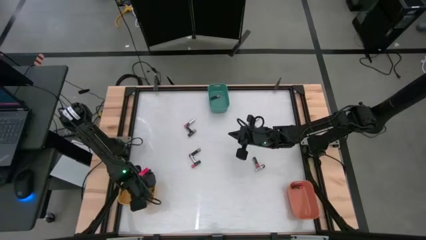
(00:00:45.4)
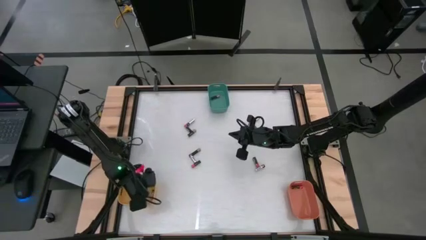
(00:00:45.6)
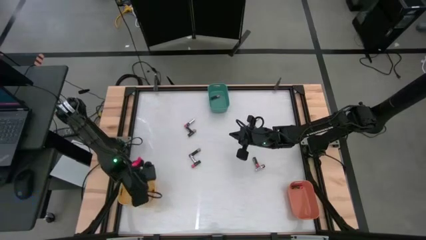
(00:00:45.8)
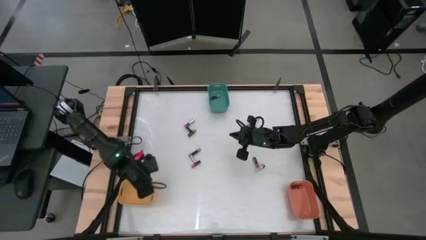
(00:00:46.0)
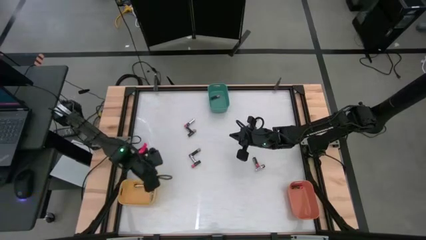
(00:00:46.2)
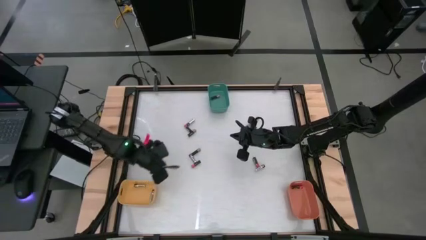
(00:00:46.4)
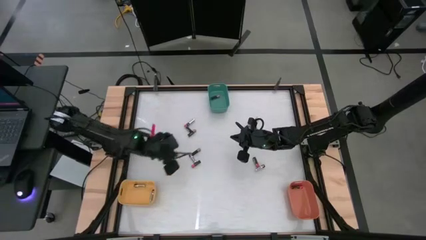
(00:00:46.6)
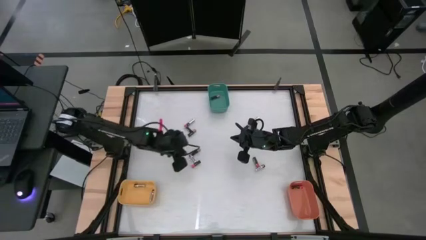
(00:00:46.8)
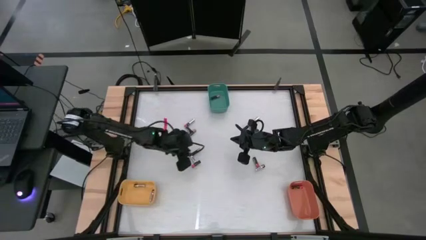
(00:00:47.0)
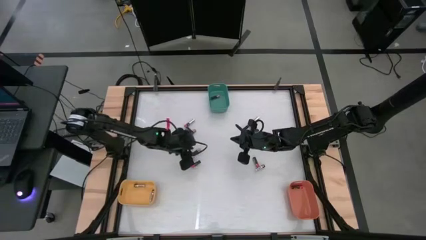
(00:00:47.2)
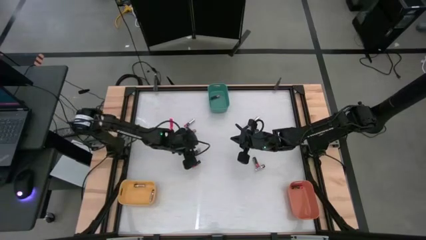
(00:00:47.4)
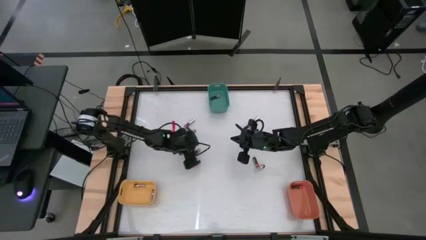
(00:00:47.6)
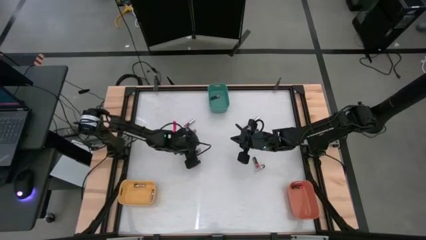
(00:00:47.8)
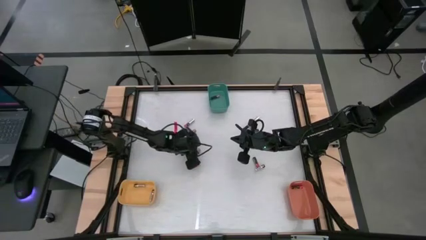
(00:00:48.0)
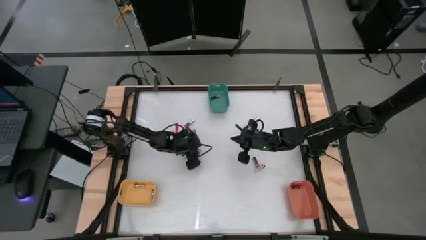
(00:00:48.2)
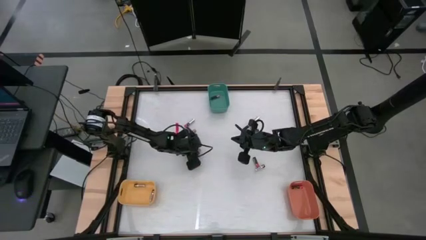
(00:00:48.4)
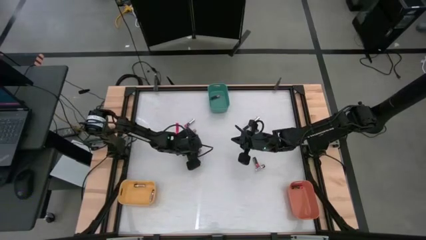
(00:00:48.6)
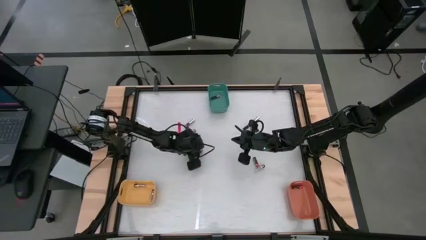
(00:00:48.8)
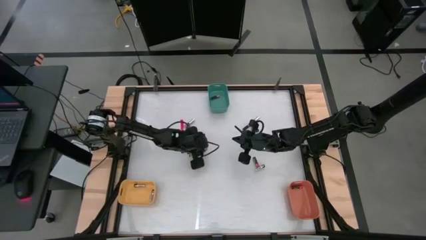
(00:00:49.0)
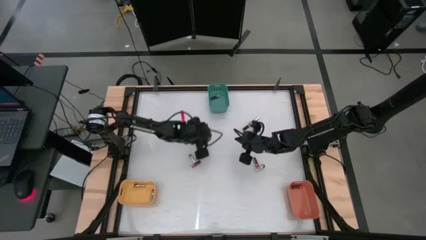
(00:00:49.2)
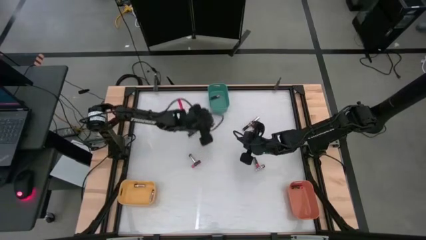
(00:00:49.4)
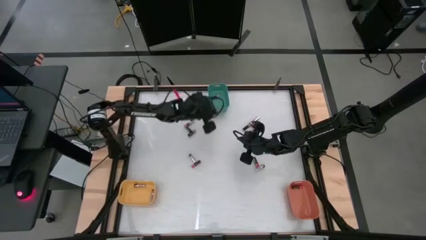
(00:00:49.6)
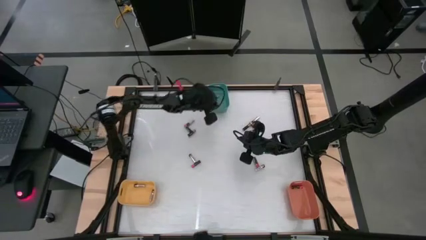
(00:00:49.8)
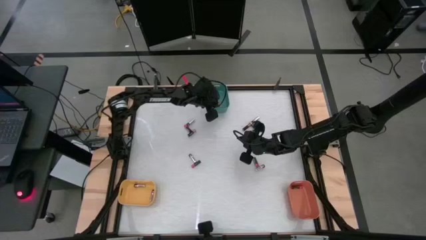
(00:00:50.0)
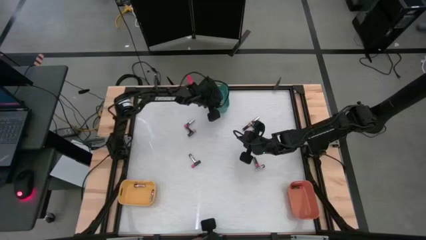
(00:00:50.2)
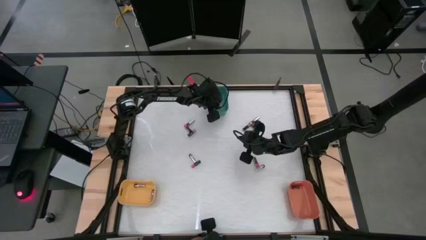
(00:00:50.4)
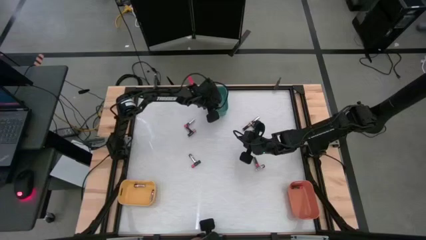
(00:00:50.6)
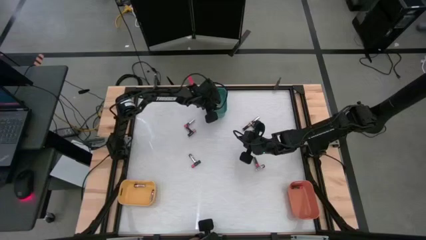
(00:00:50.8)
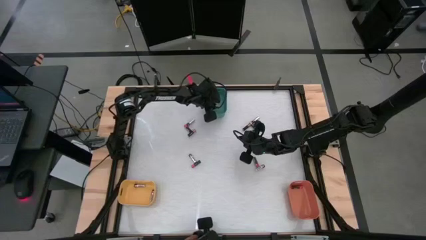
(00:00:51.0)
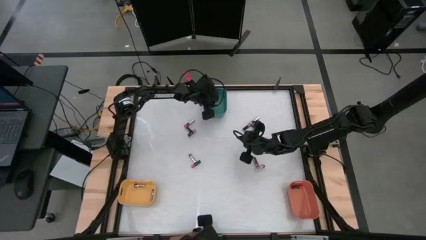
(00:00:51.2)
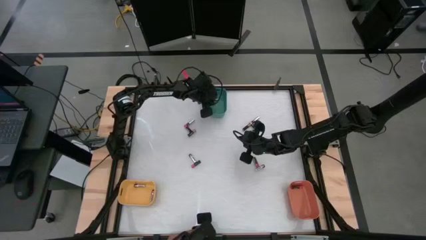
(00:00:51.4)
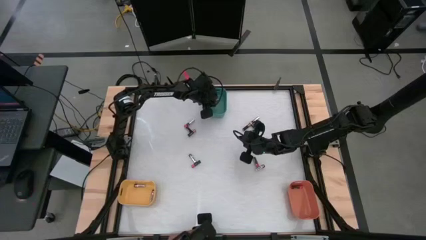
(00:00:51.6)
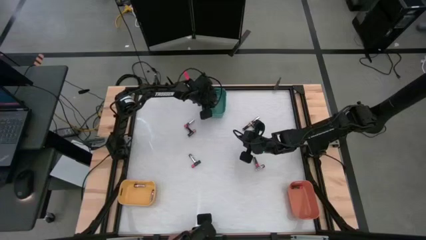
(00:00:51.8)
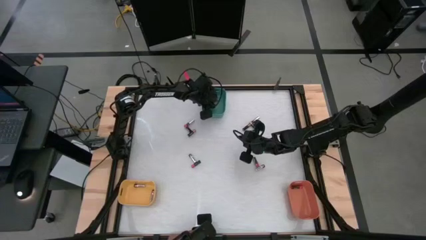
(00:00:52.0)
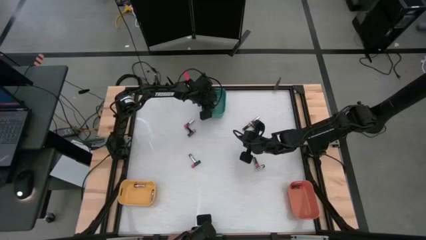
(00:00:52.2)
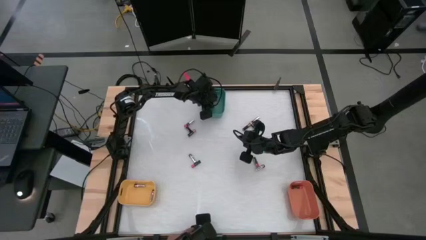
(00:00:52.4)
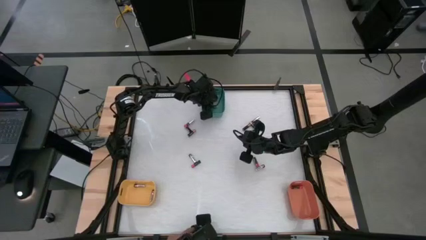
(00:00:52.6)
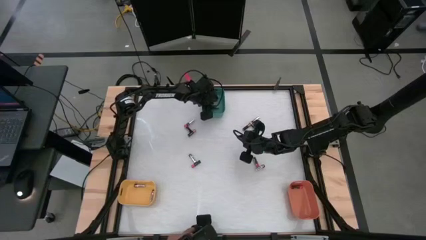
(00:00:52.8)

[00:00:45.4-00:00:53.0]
Task: Sort batteries
Put the brown battery into the green bin

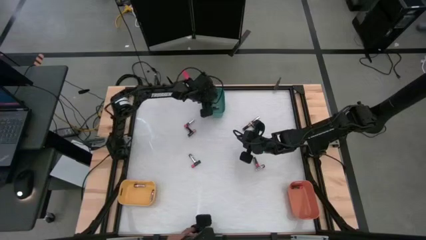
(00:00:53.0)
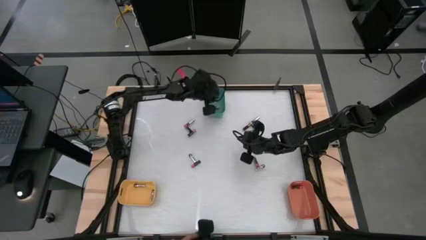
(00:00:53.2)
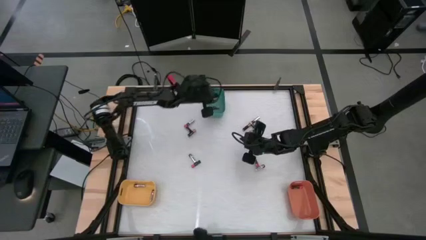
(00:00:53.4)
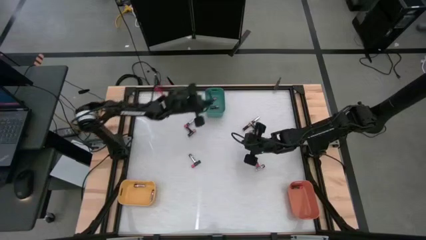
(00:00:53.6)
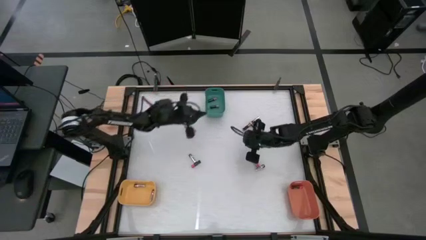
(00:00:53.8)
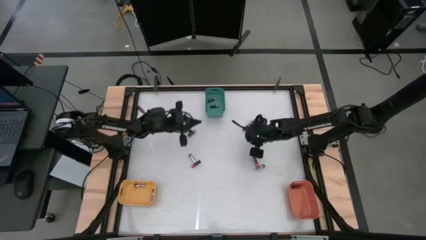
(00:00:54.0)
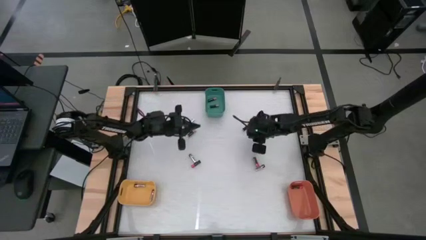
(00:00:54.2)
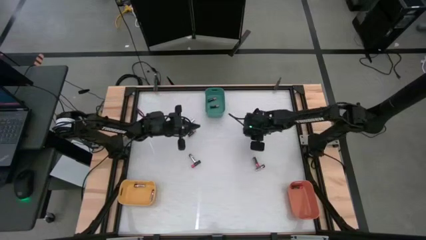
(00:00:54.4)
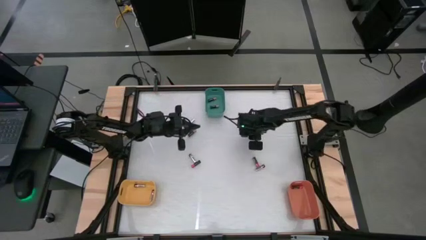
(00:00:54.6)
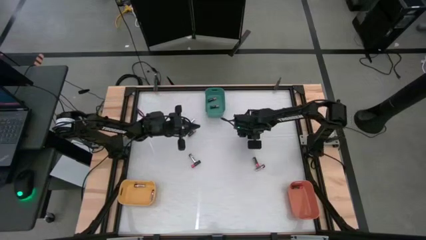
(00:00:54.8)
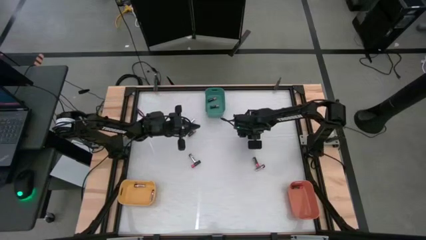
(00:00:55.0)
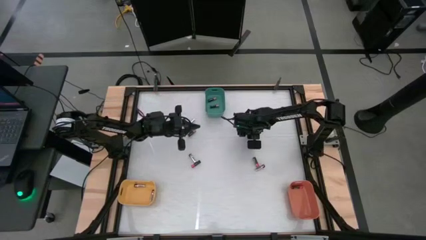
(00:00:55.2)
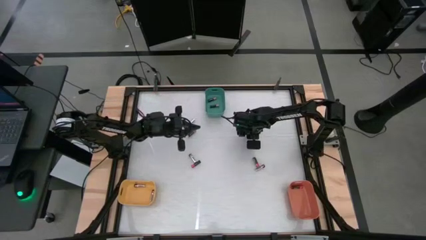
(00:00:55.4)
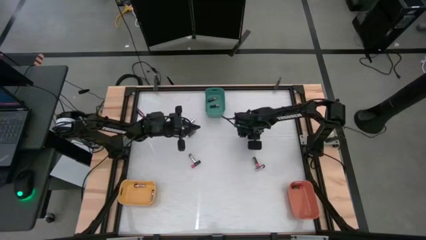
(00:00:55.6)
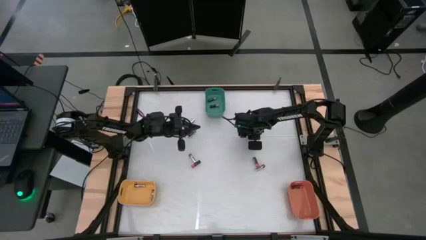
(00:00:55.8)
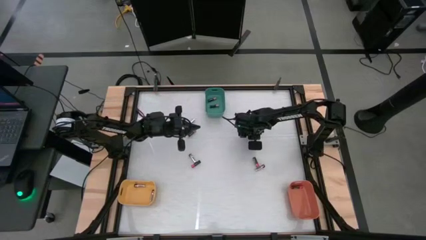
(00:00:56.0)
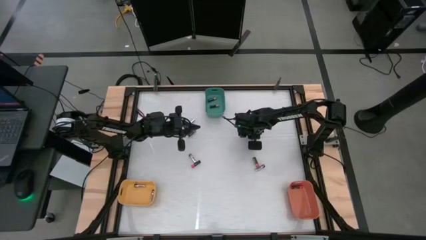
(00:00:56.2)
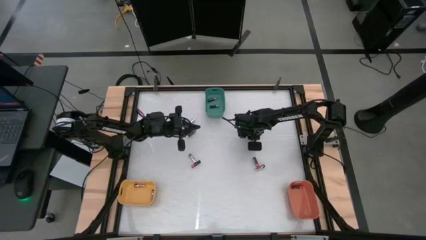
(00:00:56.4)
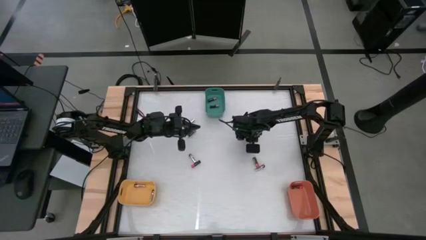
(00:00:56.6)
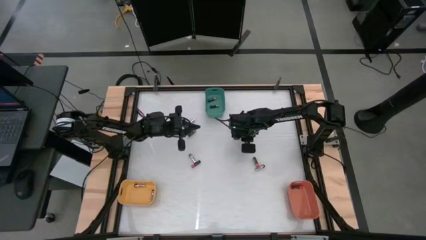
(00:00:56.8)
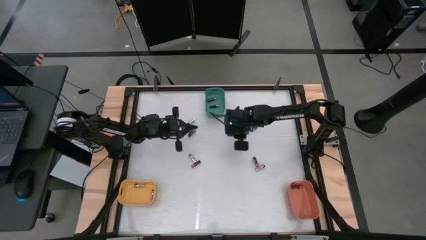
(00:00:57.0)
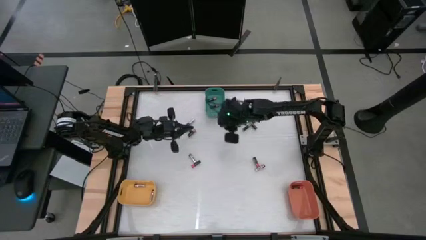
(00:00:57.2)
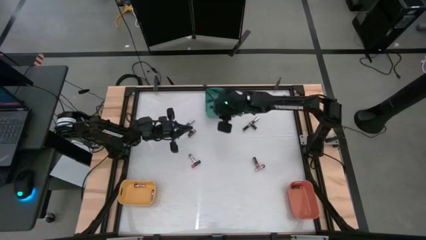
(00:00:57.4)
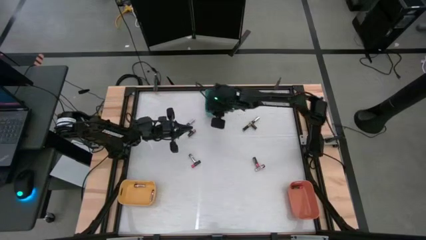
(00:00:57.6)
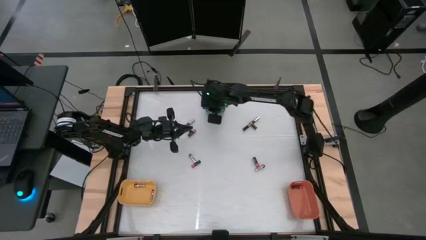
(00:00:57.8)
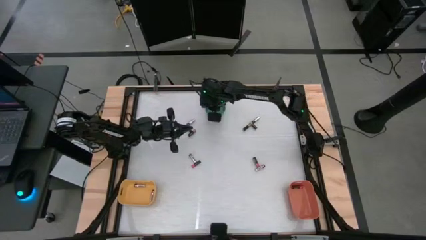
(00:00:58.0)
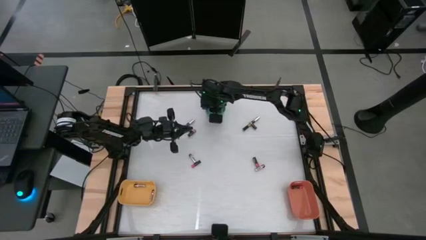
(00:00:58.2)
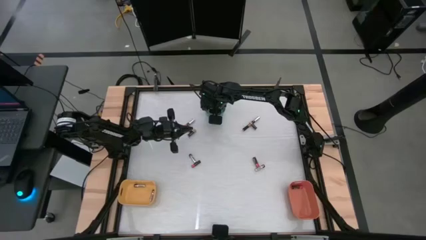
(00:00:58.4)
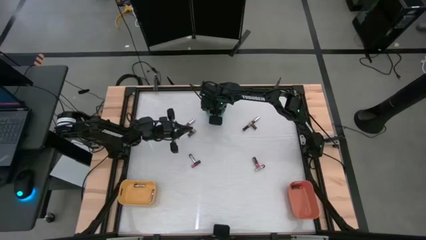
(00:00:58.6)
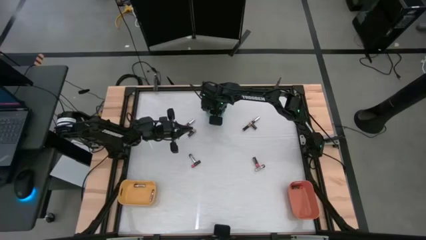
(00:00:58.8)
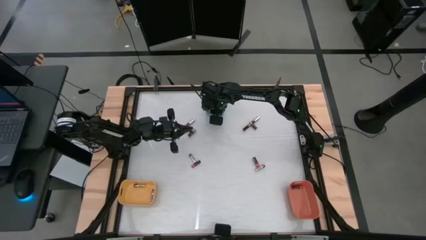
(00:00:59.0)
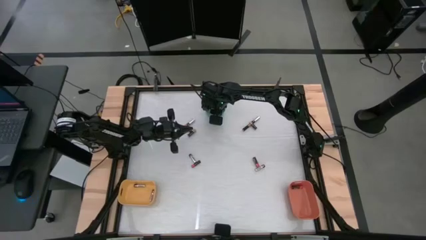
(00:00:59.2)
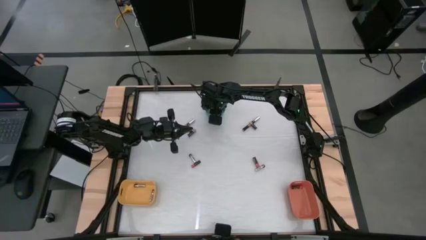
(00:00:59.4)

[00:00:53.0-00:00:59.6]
Put the brown battery into the green bin
